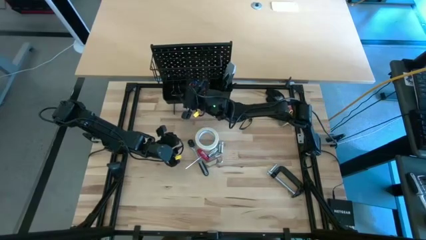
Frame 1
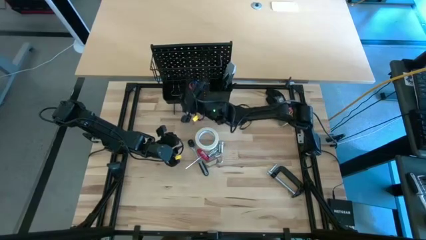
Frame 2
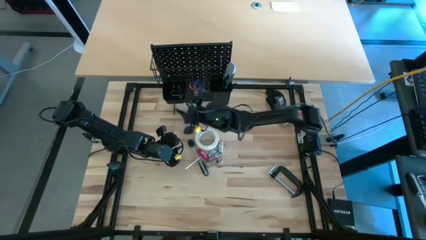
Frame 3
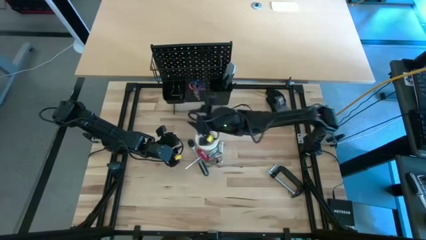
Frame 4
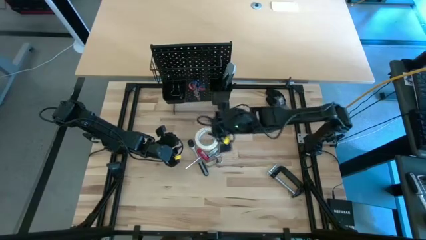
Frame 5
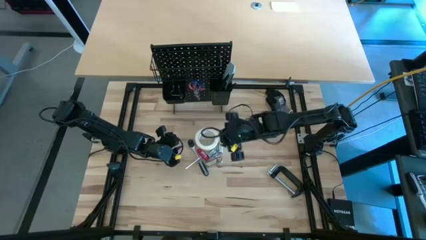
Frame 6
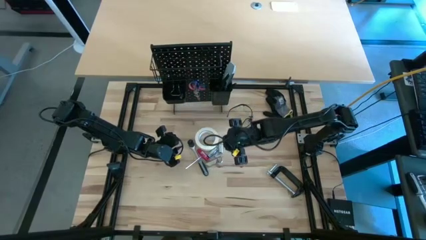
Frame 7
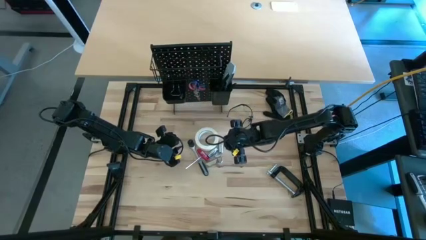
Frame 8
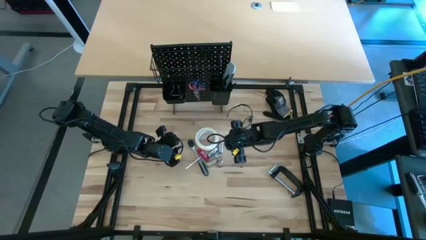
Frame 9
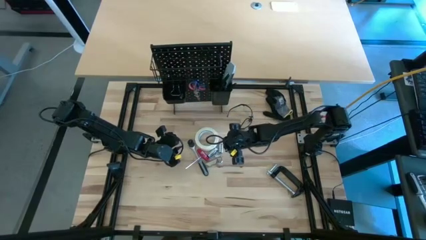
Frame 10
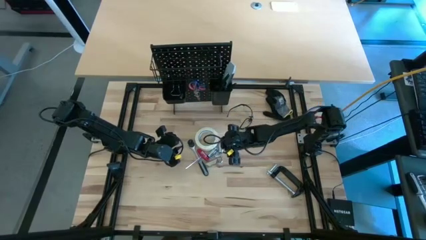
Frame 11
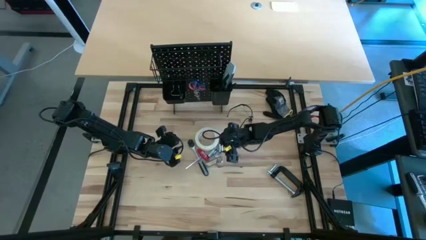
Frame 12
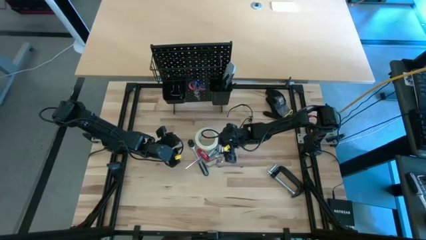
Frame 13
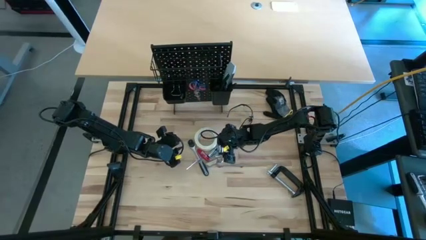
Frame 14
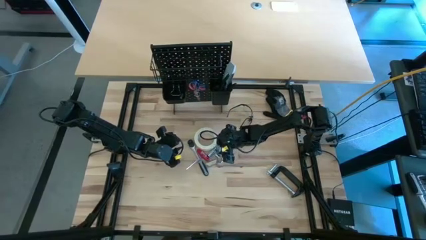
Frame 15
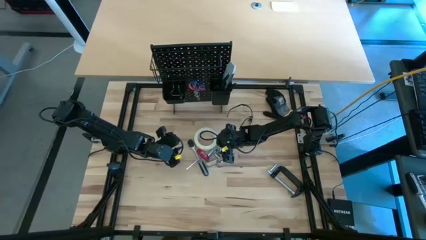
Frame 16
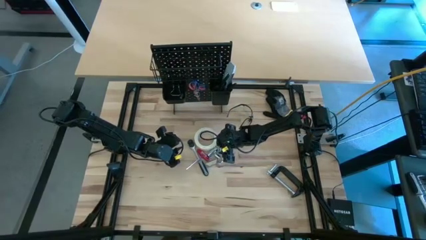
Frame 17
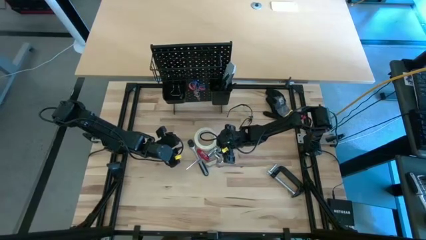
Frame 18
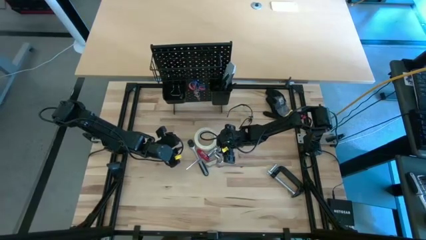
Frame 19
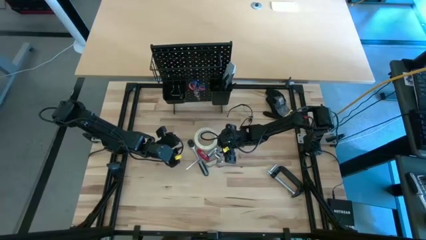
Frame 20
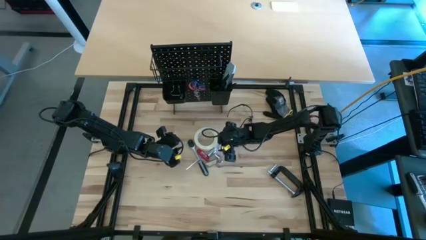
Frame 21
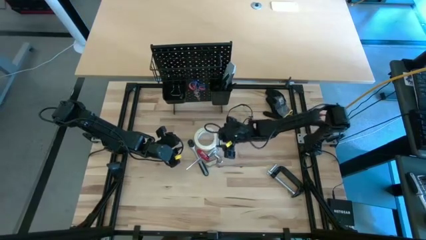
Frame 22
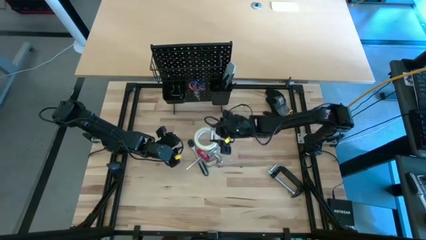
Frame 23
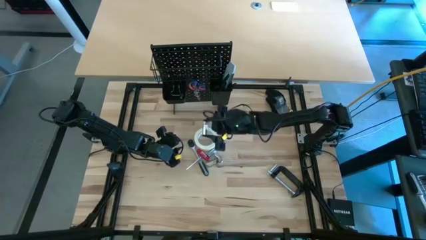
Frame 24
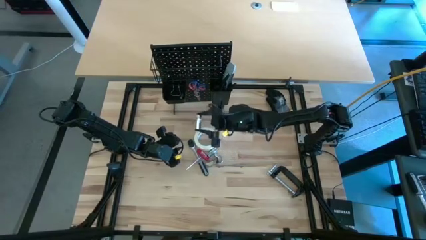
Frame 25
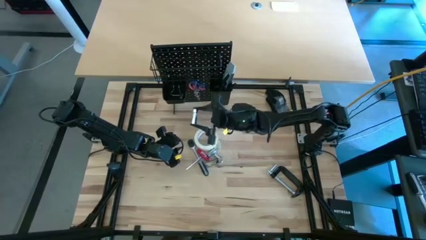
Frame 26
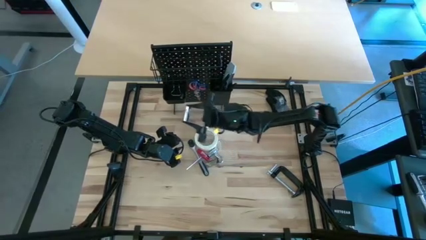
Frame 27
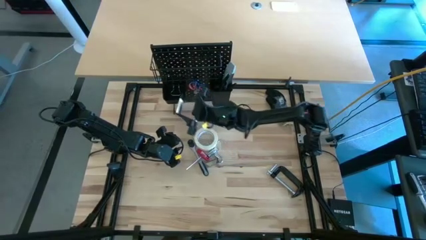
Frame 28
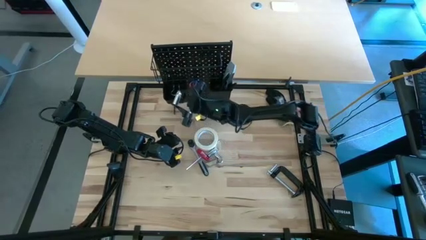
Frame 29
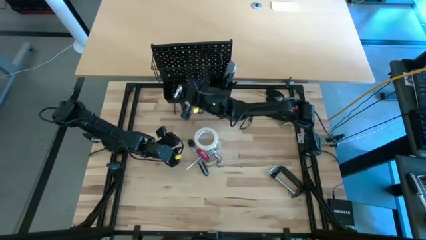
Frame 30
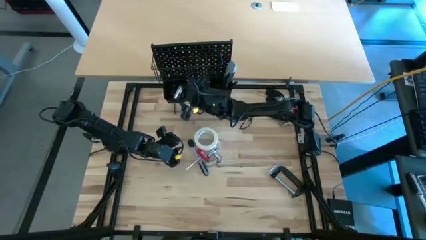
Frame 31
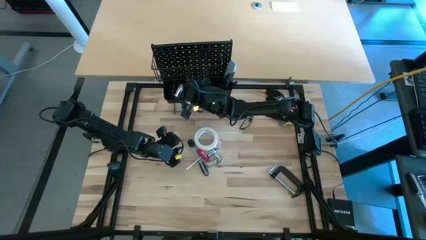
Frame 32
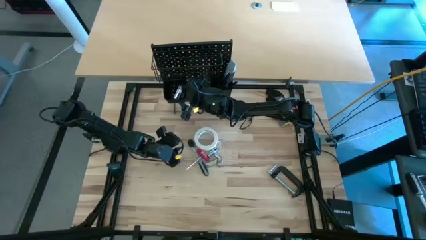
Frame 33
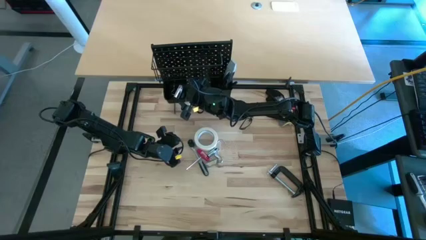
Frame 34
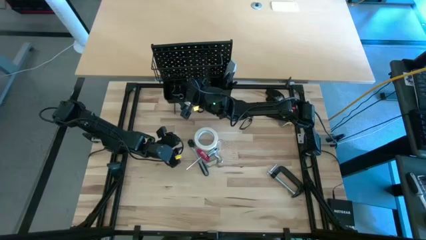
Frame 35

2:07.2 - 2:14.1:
Task: Hang tools onto peg board
Put the silver extension bar into the left black bin on the peg board

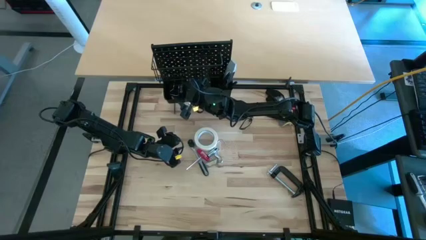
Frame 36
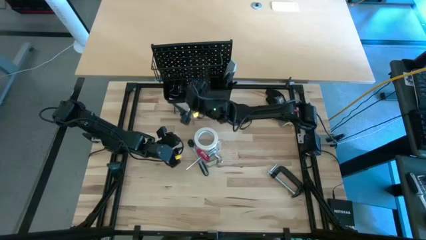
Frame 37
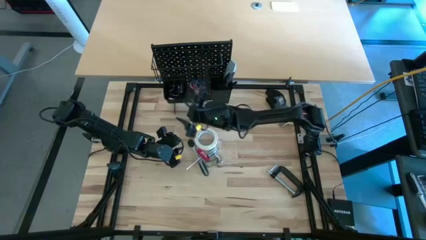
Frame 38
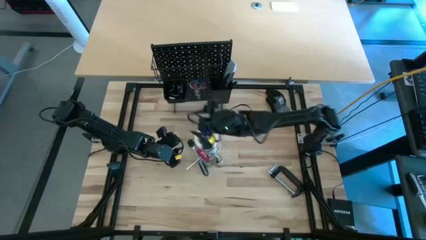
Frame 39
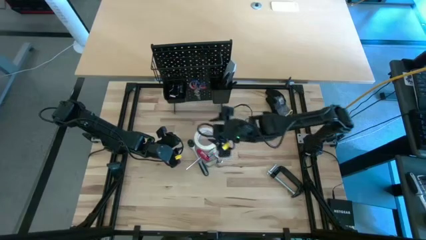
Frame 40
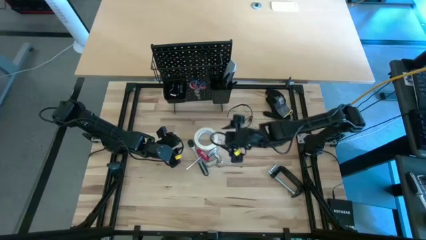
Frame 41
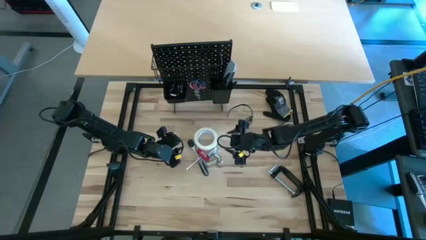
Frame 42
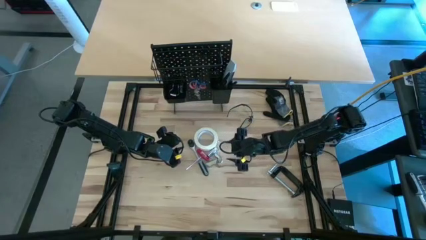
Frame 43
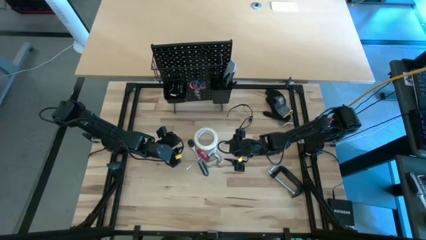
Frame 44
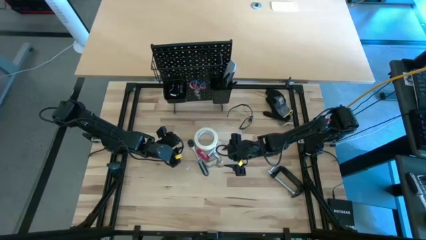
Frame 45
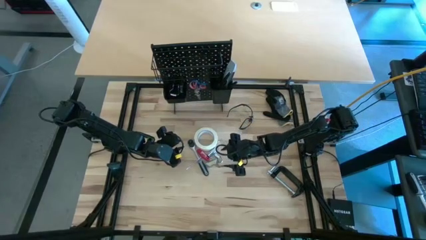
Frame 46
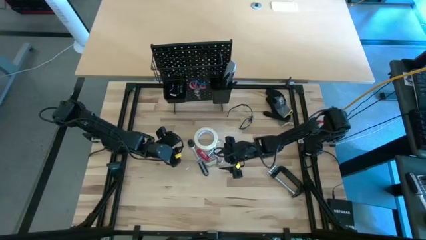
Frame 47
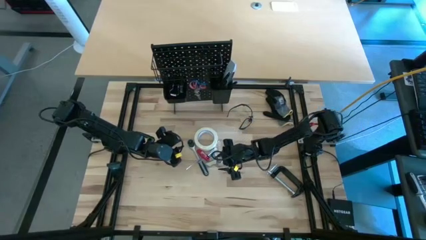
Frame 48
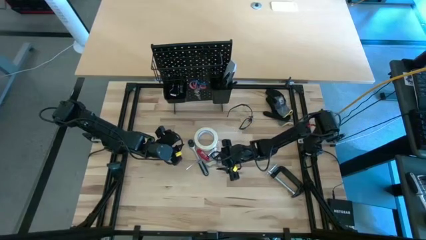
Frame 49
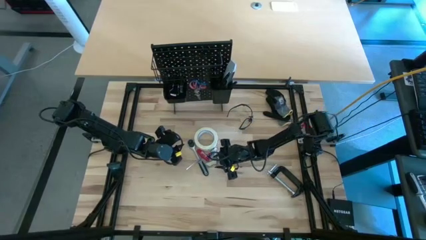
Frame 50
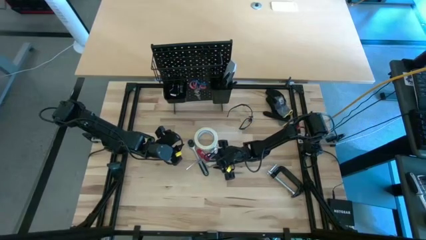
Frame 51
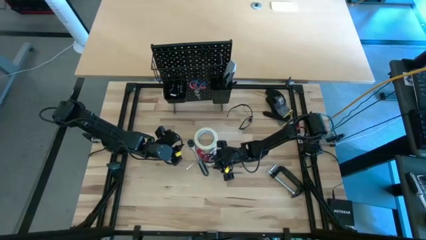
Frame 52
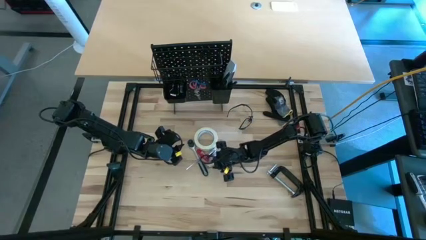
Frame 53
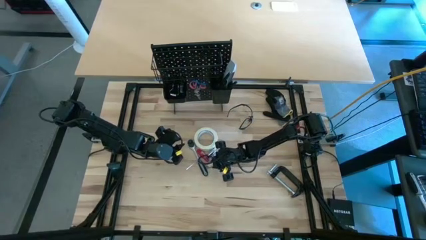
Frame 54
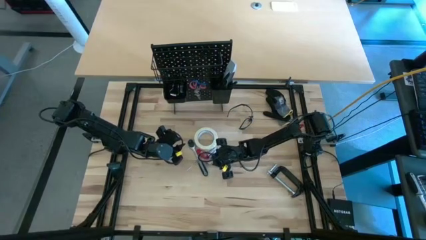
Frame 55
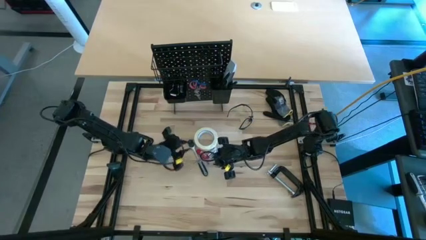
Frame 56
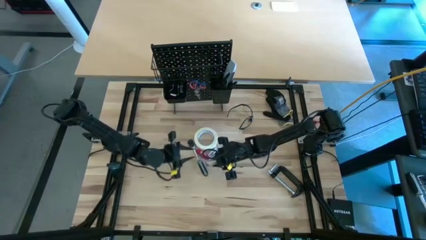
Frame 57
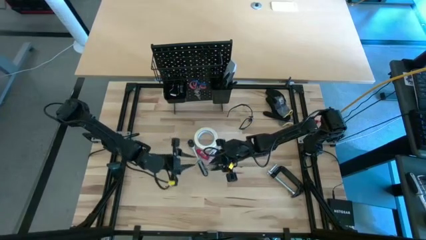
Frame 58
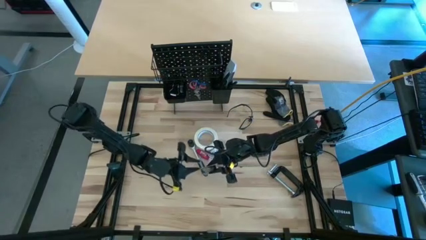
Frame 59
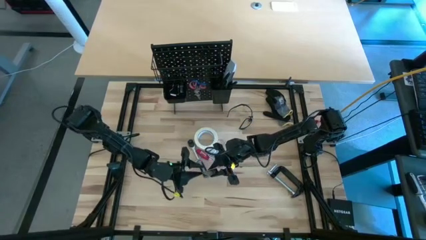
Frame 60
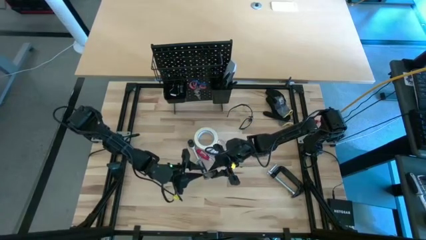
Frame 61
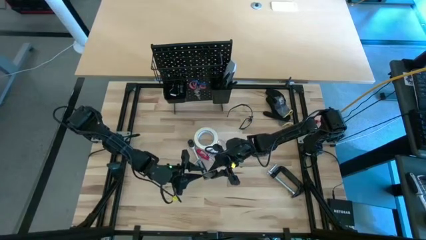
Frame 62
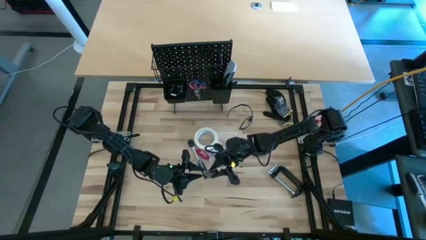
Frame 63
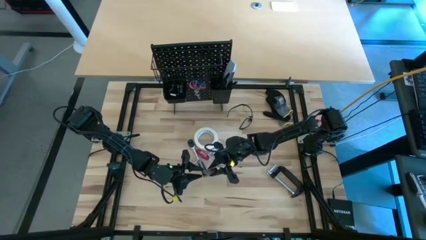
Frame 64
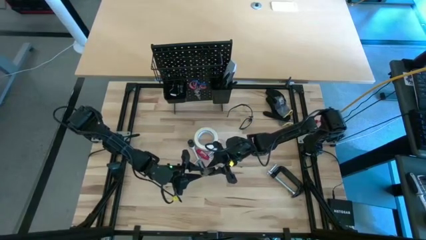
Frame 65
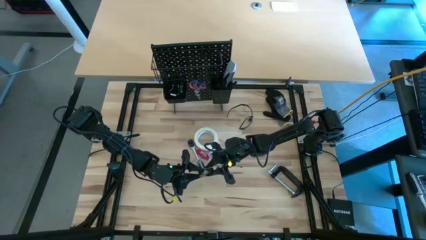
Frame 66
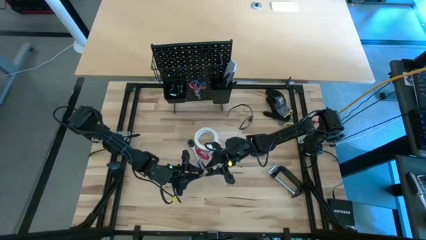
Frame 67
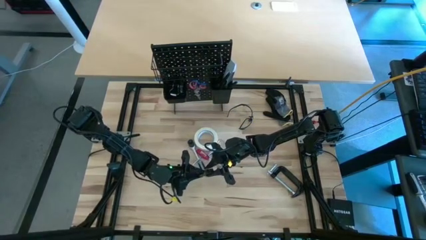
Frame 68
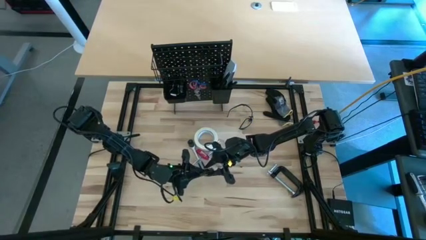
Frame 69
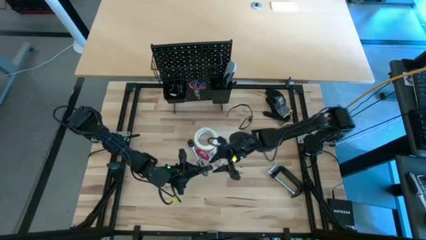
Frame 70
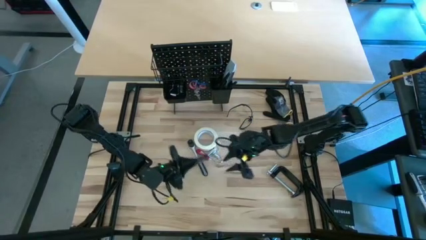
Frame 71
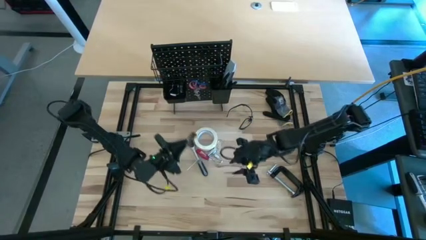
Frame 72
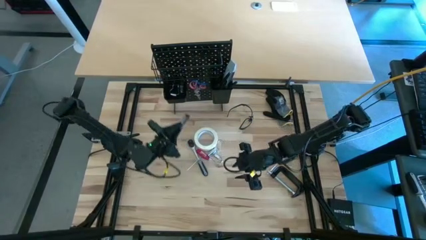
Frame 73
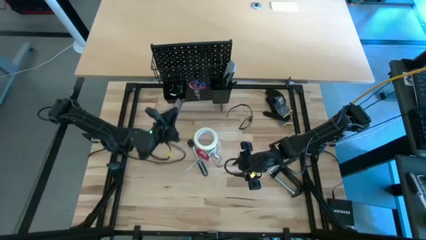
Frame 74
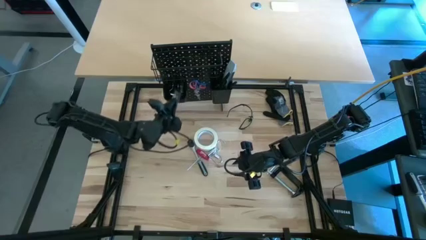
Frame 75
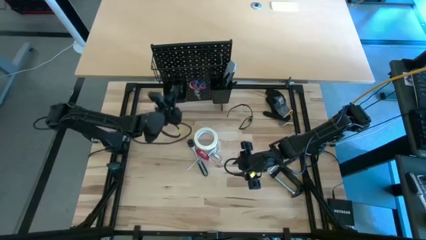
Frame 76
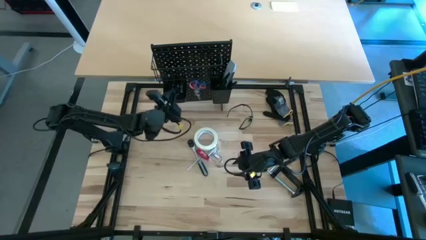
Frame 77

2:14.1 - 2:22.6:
Put the transparent utility knife blades into the left black bin on the peg board

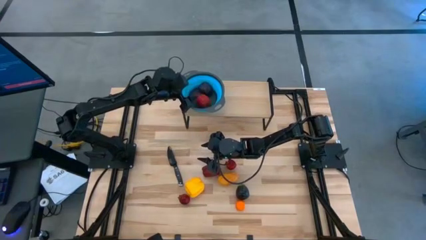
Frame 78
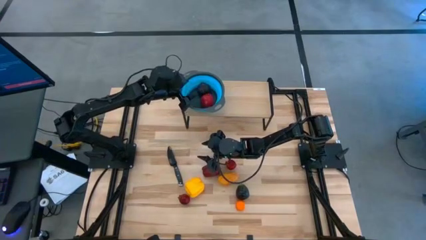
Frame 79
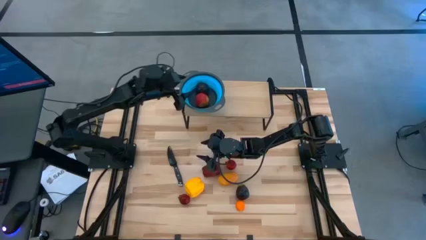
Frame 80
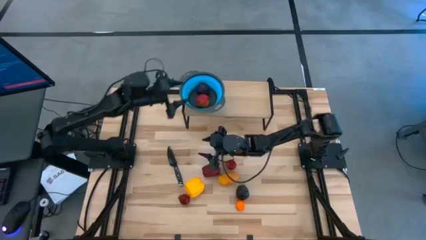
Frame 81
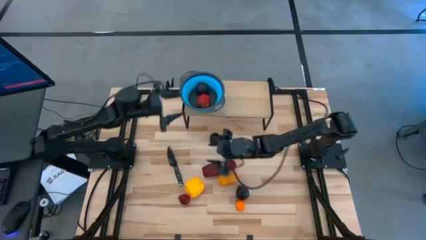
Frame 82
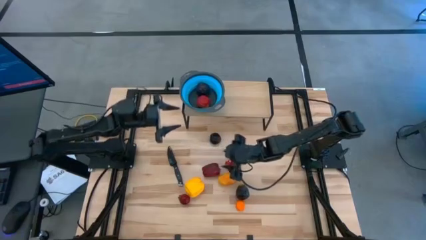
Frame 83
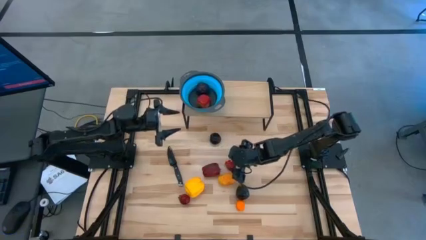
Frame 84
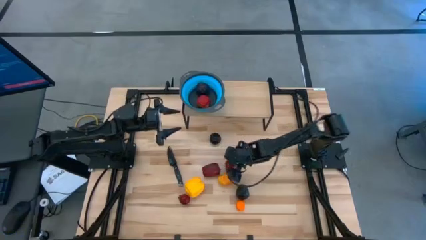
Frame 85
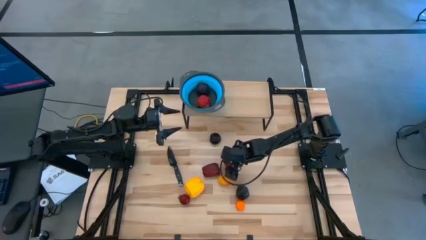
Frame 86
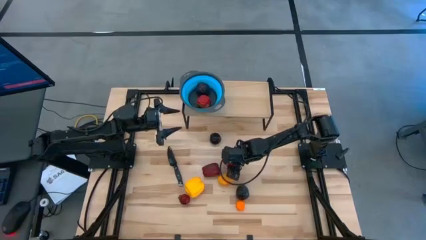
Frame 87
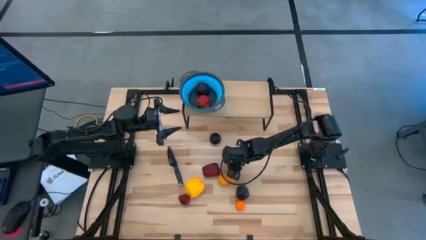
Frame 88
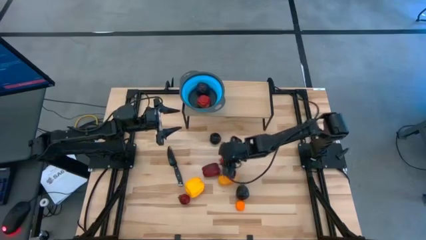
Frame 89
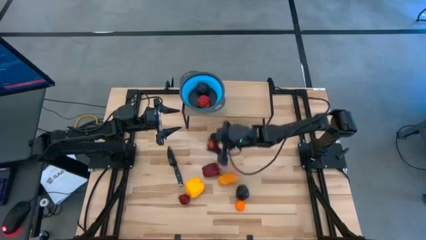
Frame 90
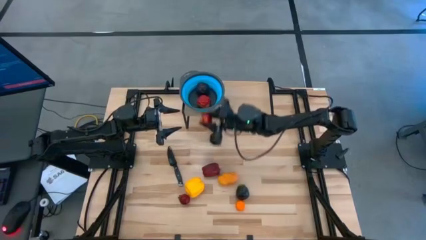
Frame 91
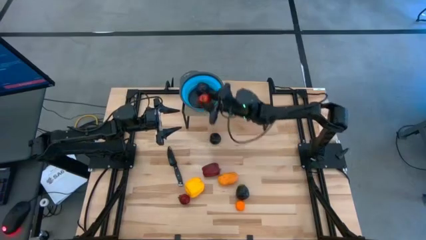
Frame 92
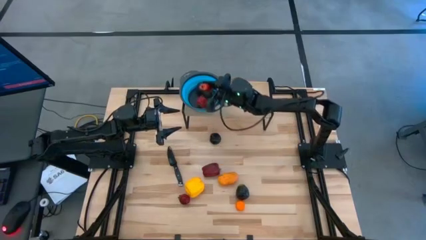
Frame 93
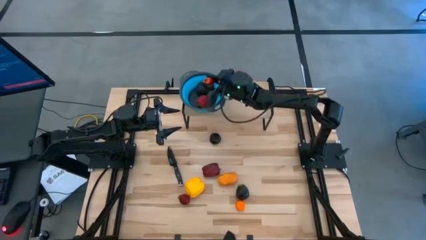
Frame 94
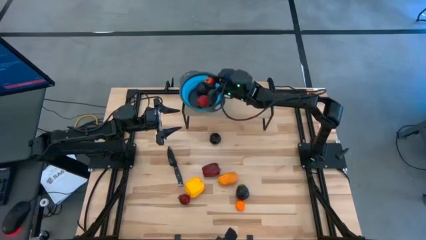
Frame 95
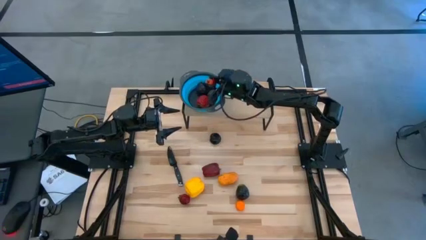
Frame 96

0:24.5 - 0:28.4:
Task: Pick & Place Fruit
Put the top pomegranate into the blue strainer bowl on the shelf
